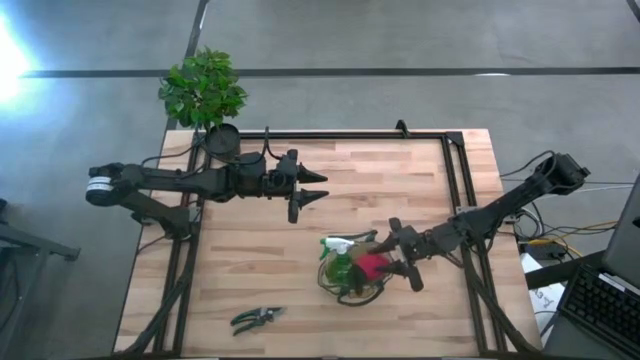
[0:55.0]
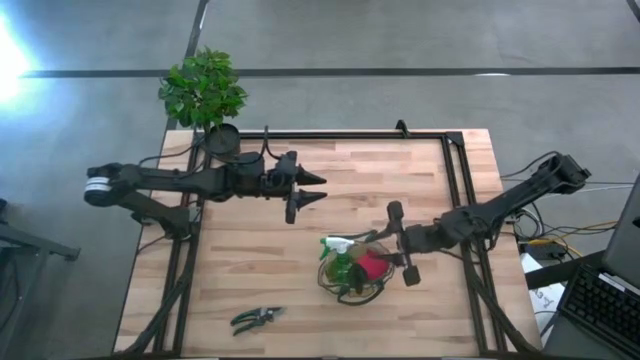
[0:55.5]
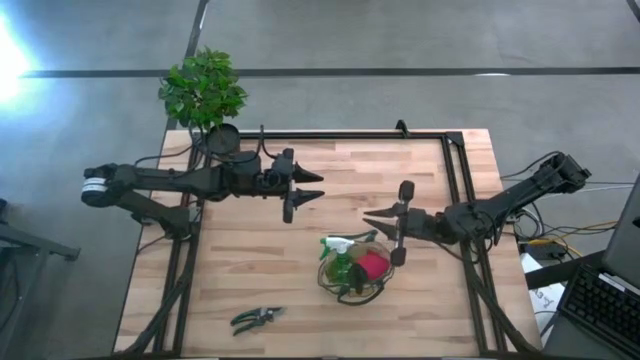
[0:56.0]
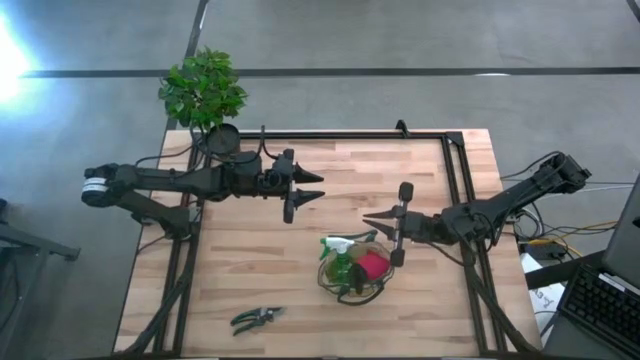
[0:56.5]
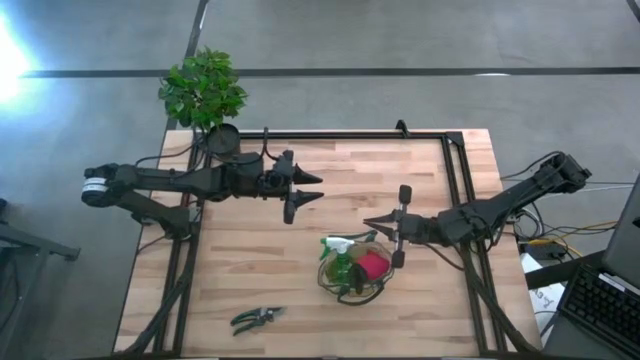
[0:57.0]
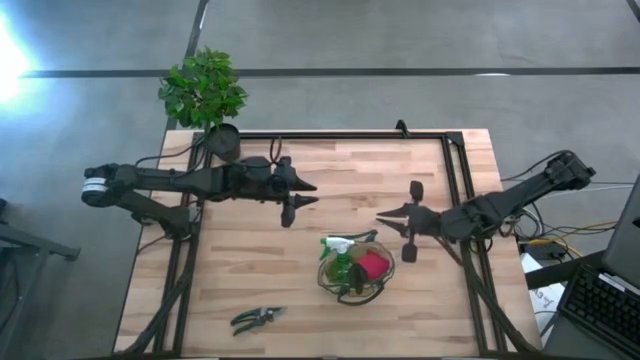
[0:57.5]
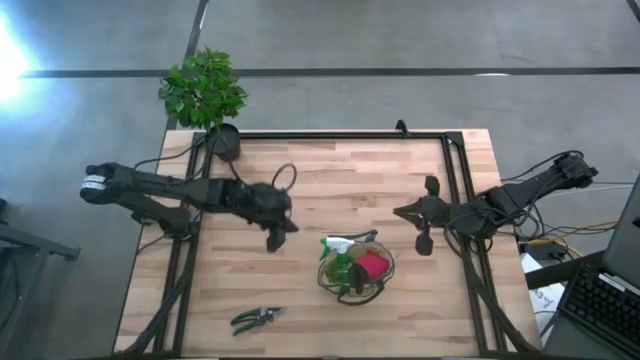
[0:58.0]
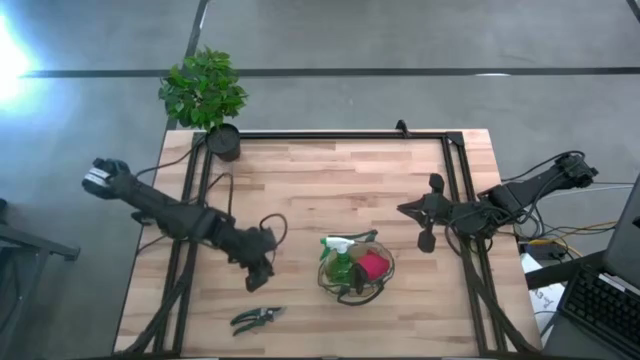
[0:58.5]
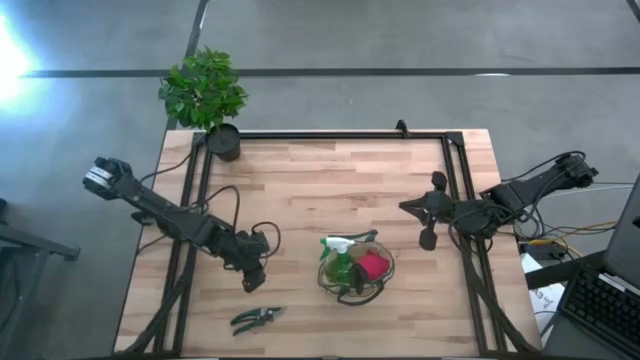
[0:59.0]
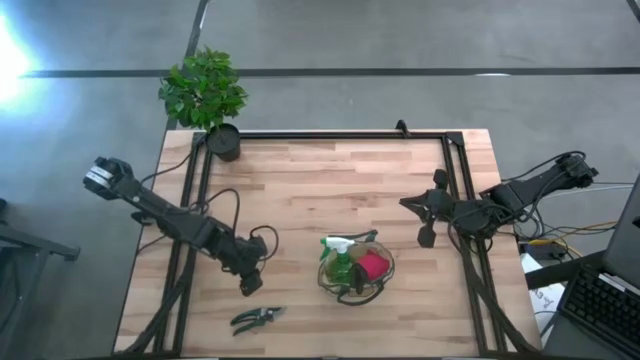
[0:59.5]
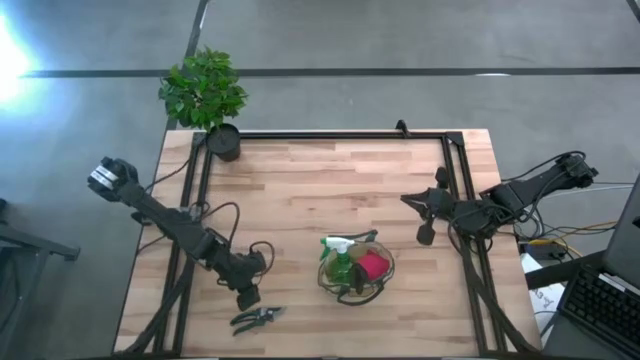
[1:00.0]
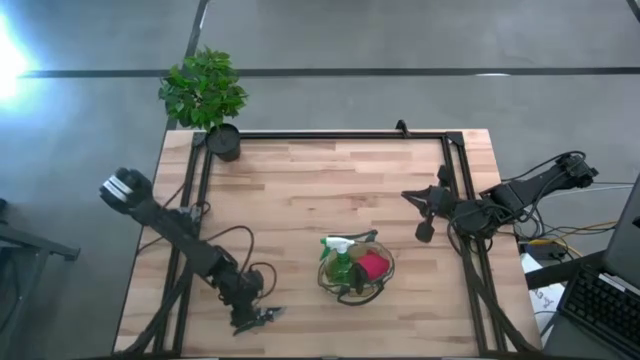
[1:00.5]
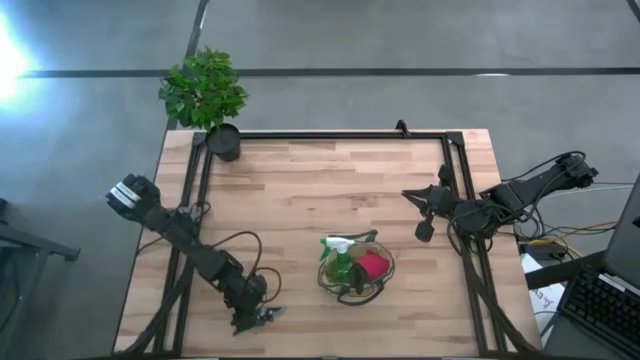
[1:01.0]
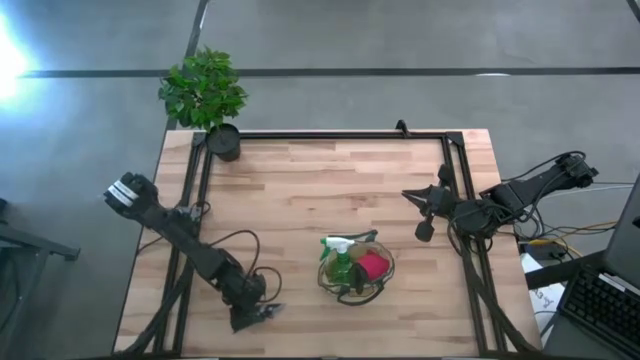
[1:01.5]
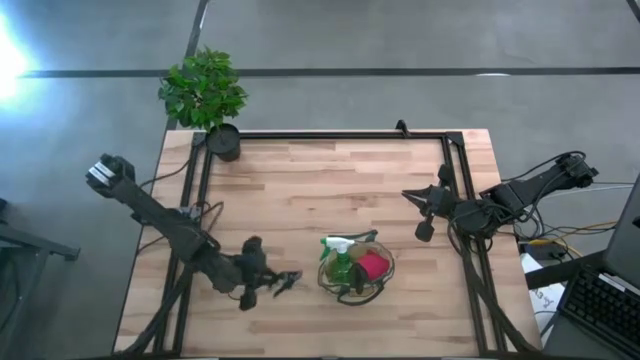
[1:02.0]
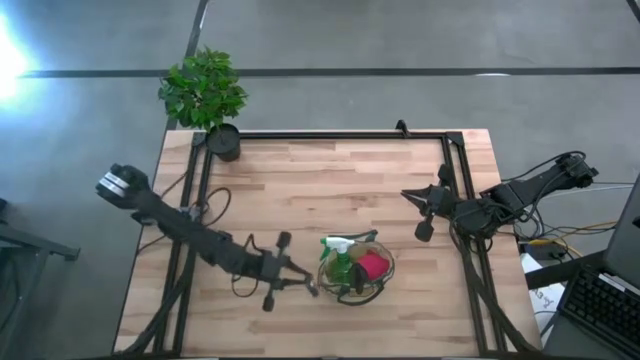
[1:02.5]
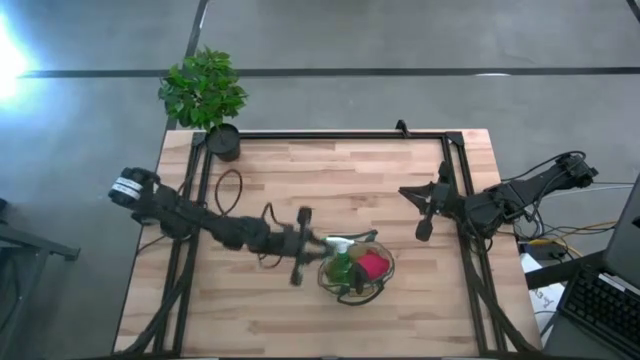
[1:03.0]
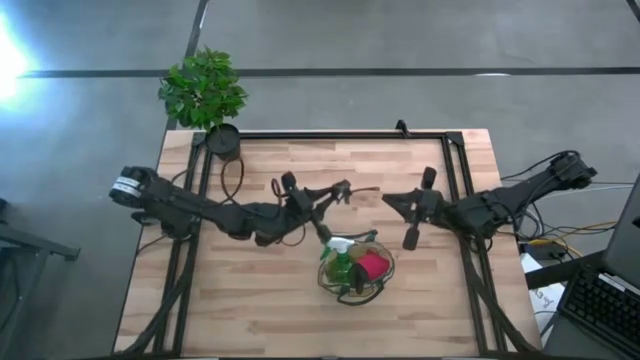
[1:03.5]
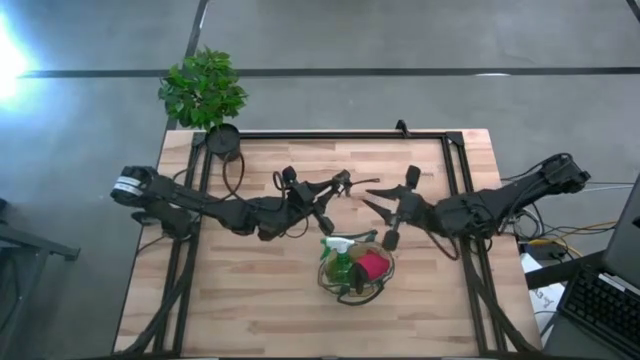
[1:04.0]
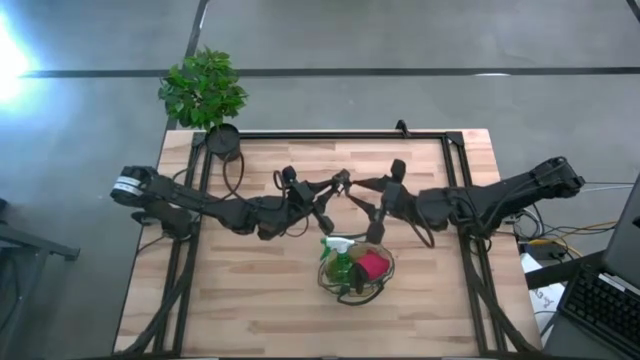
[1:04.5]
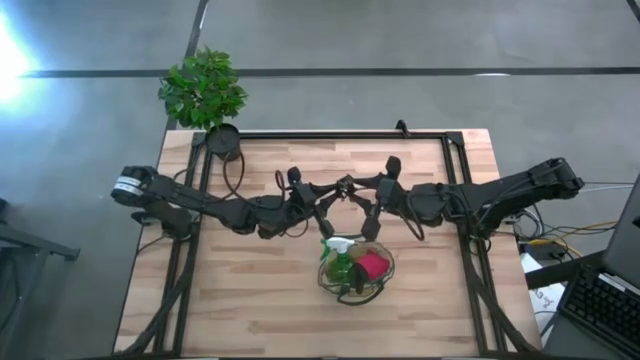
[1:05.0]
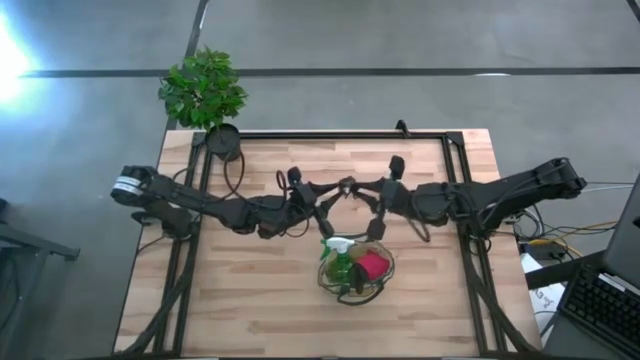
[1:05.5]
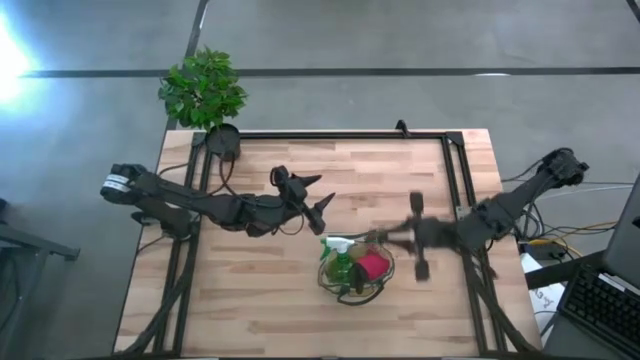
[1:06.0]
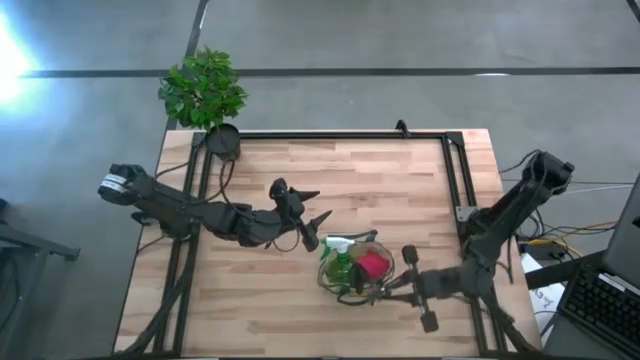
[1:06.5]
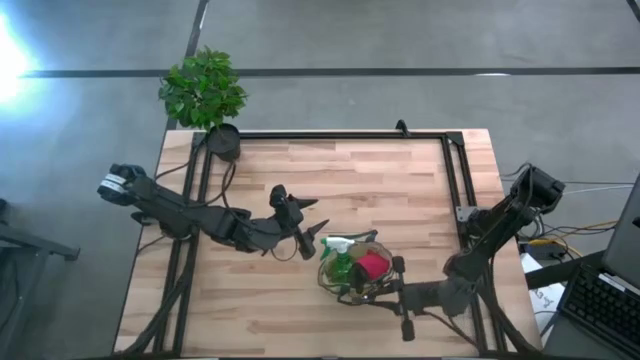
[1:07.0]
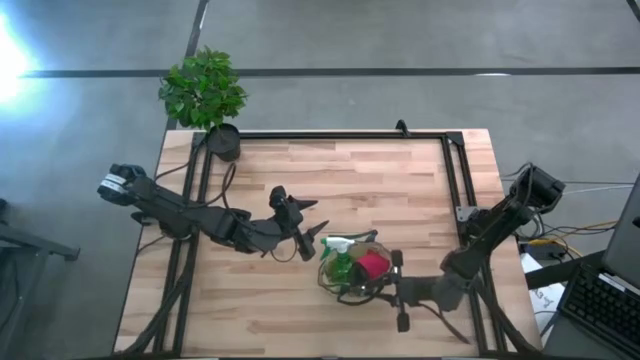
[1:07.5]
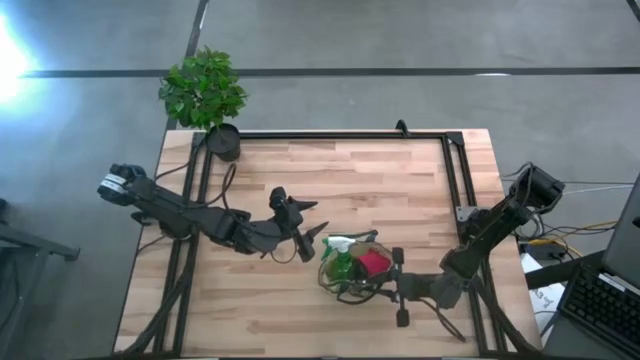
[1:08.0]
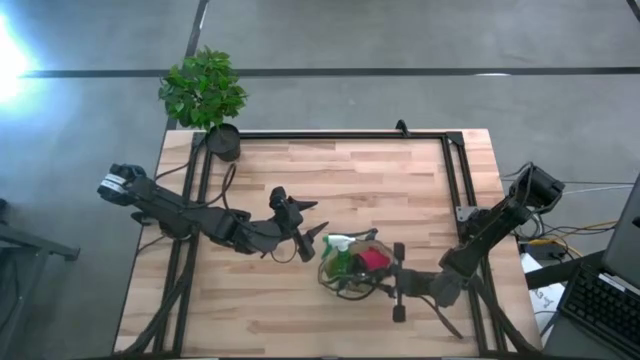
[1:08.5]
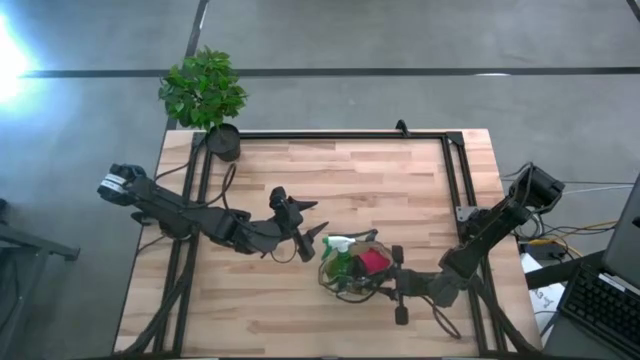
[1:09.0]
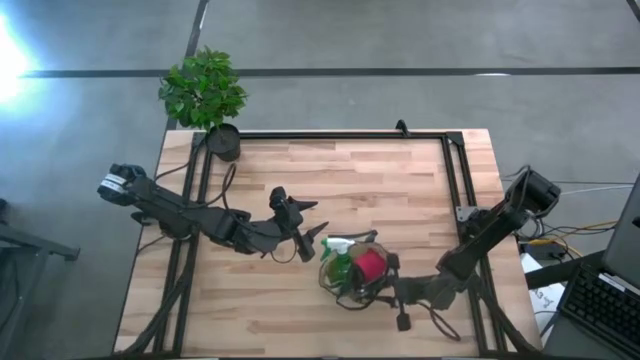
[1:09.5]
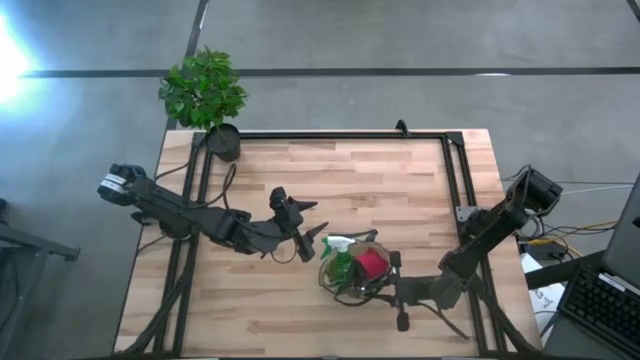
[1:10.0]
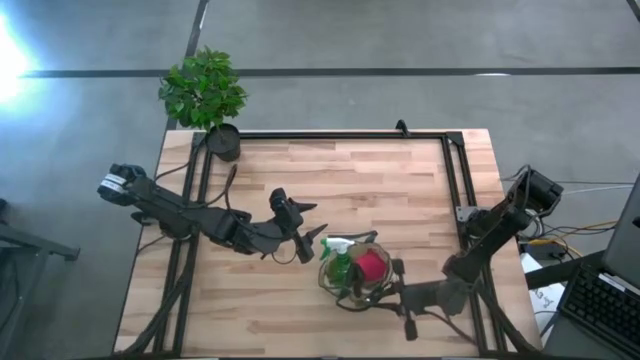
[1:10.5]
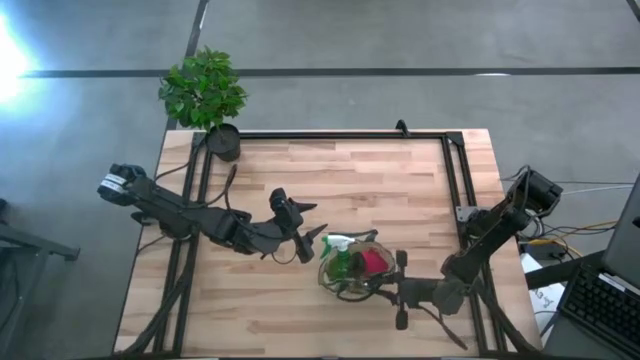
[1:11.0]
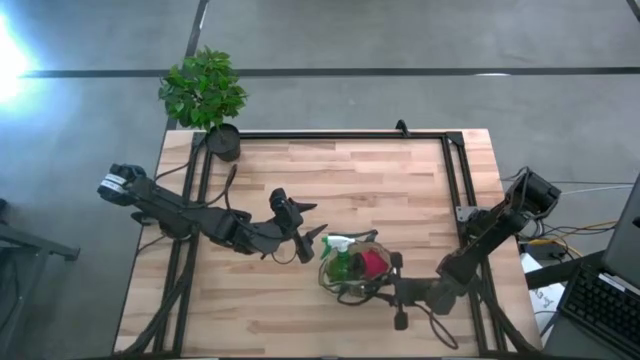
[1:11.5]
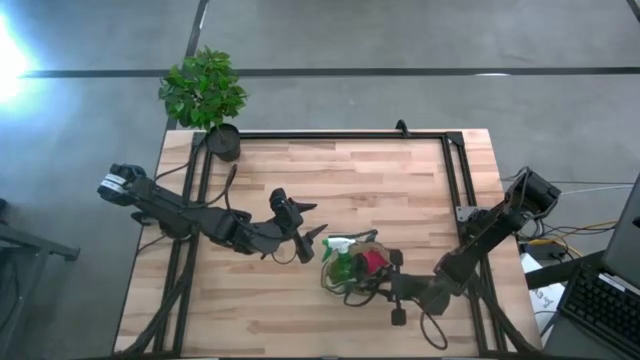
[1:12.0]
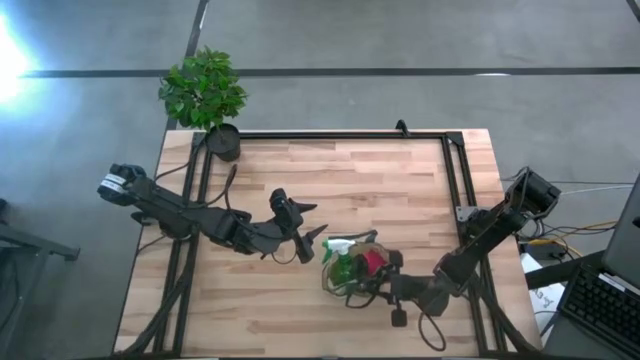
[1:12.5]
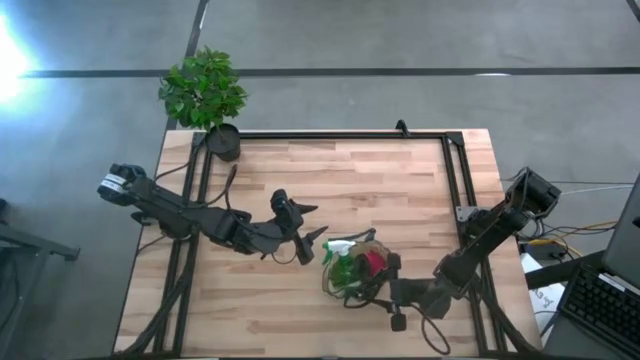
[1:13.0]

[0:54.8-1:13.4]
Task: Pick & Place Garden tools in Gardening bag
Put the green shear scissors into the gardening bag

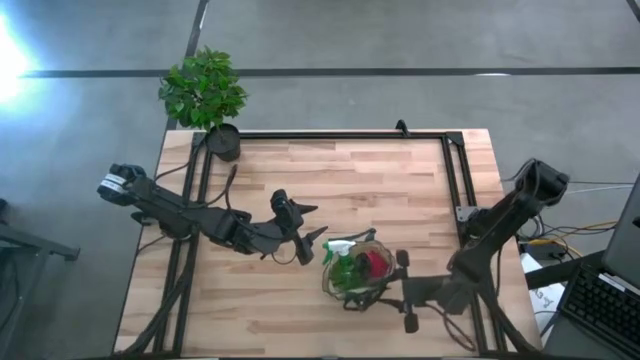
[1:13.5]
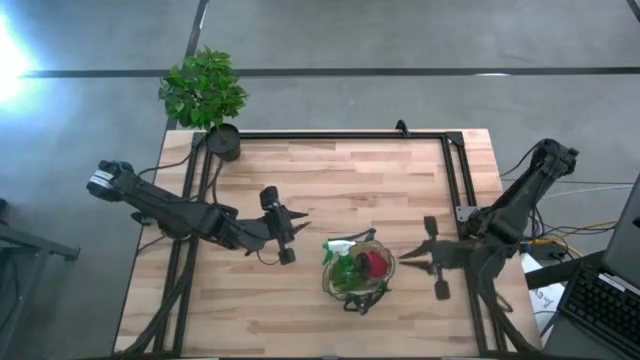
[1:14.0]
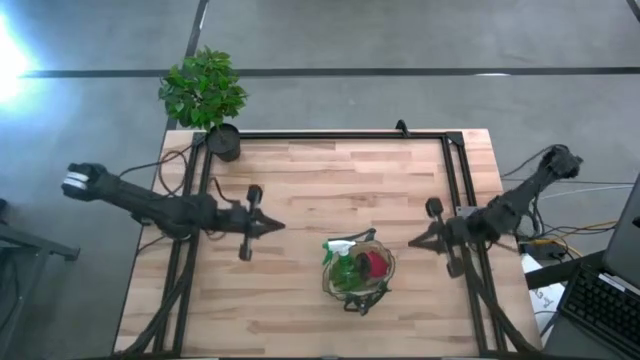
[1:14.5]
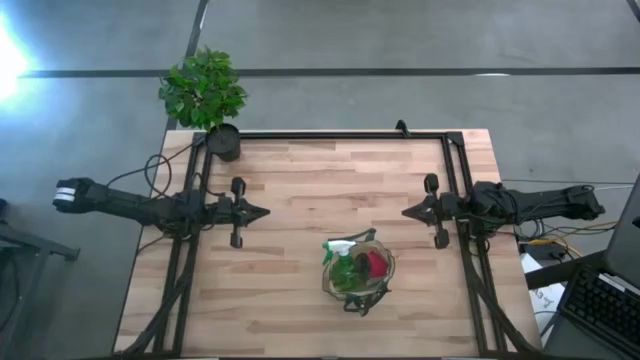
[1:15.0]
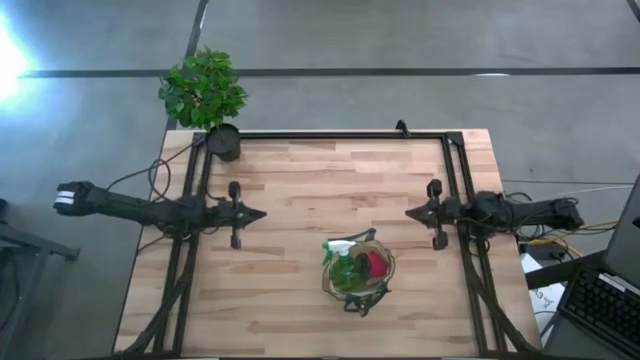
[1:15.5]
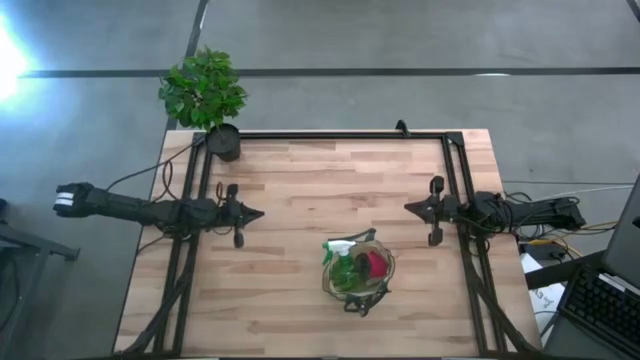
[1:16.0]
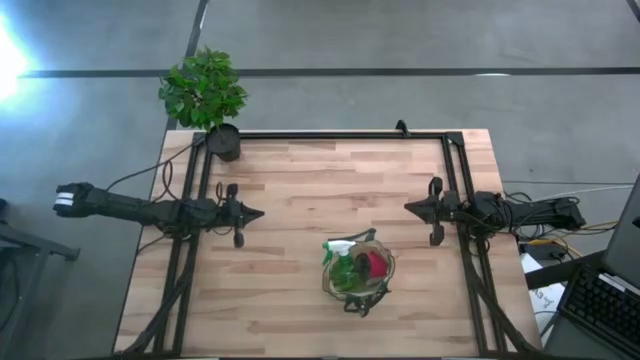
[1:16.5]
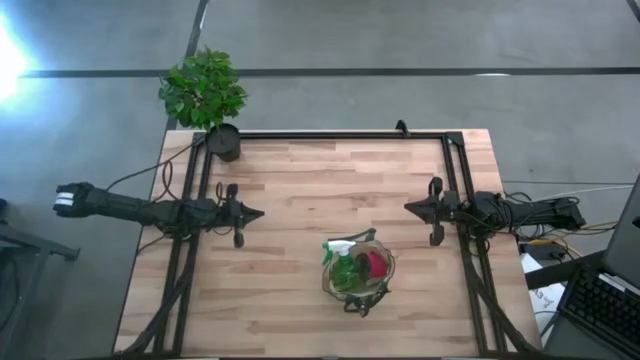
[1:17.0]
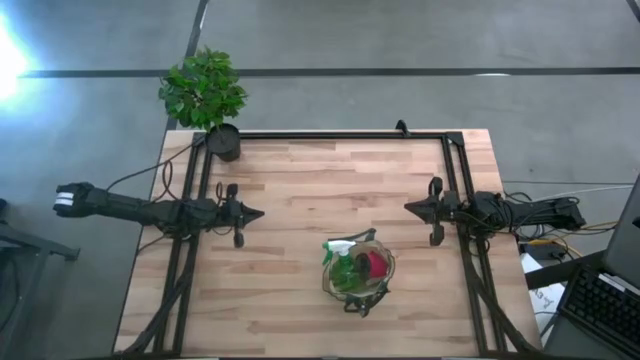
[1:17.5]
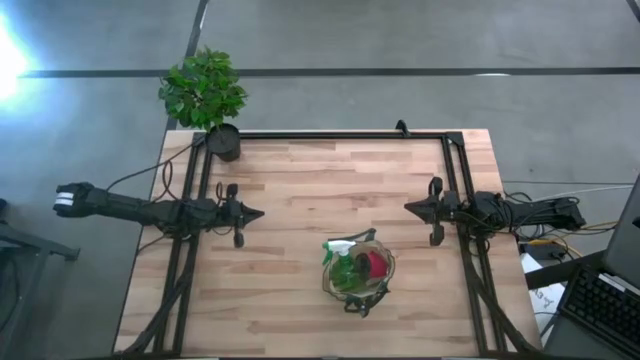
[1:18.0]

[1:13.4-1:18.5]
Return to Home Position
